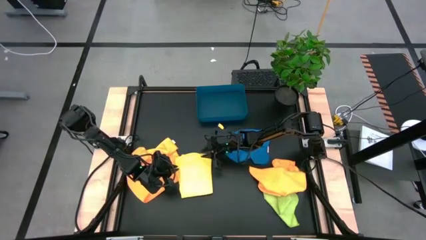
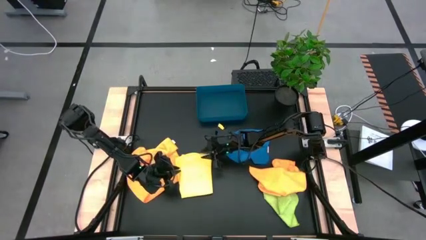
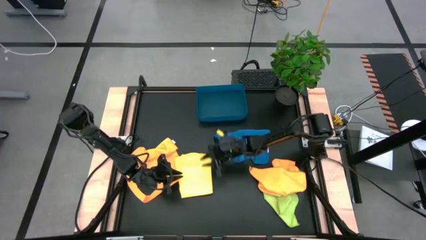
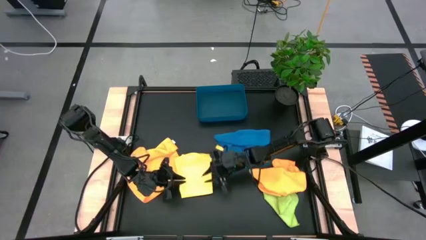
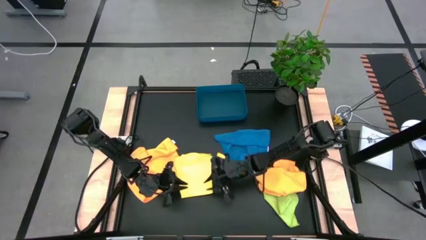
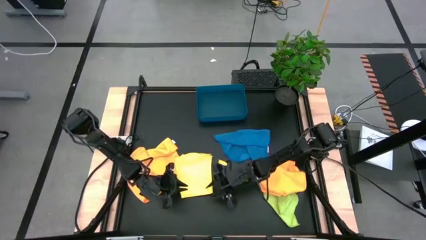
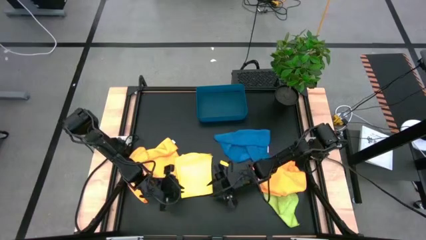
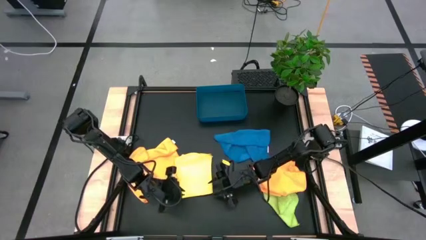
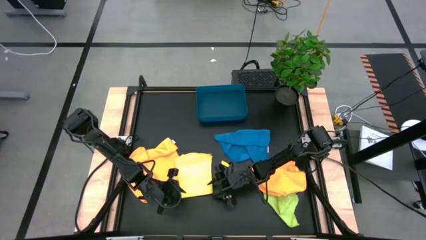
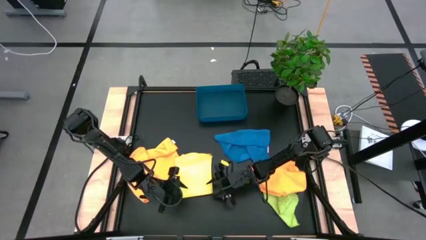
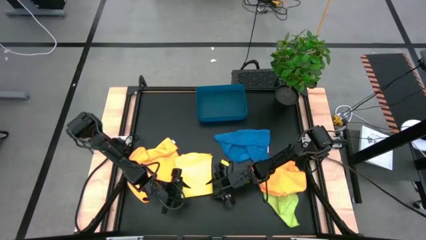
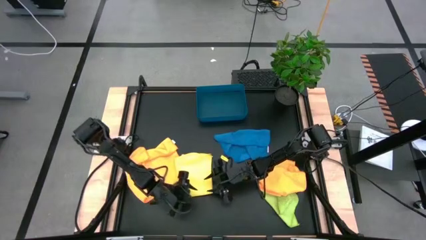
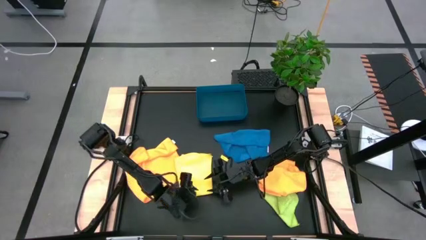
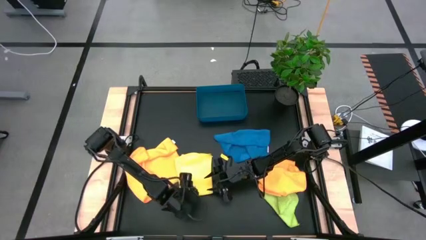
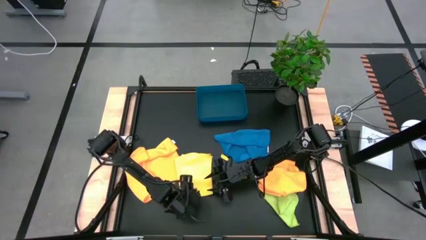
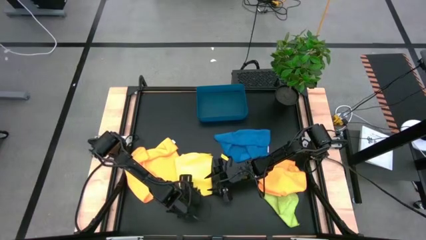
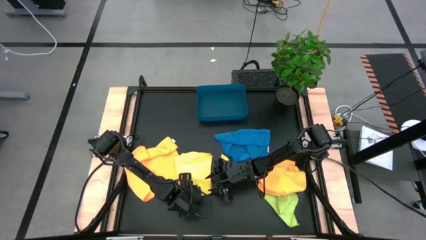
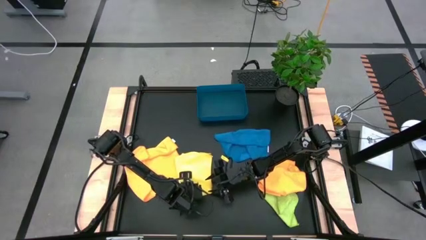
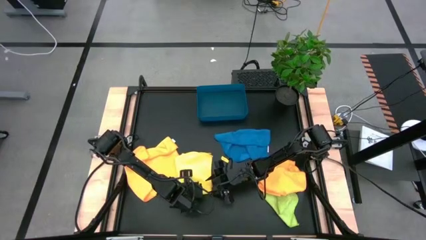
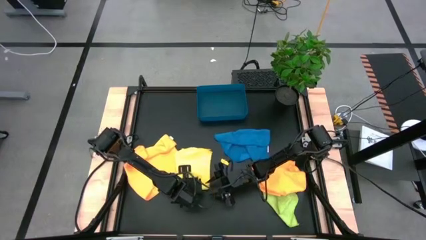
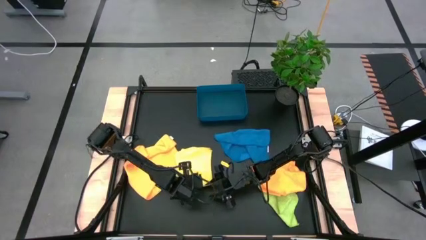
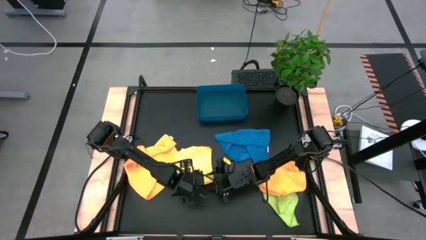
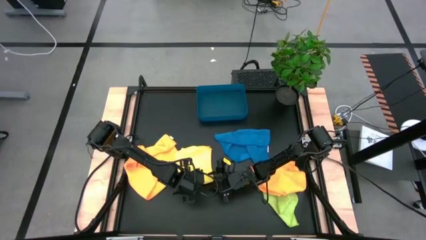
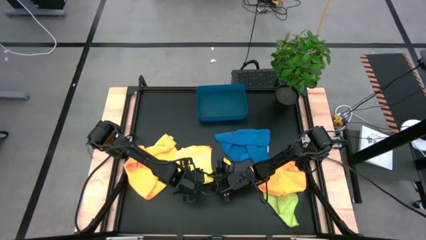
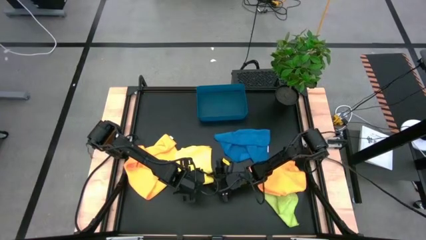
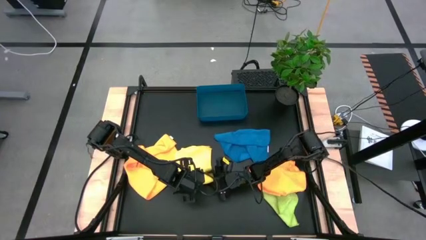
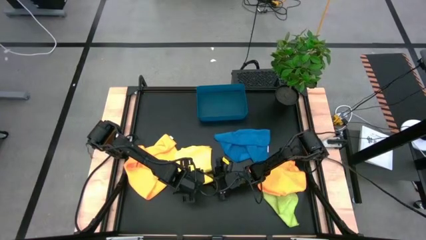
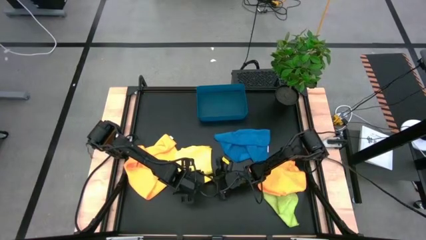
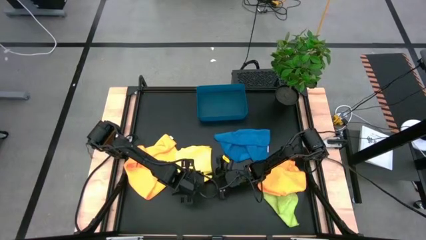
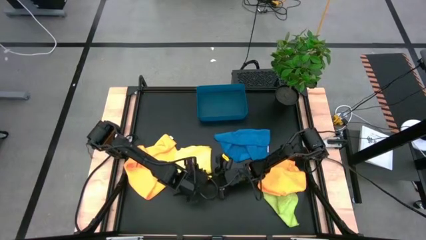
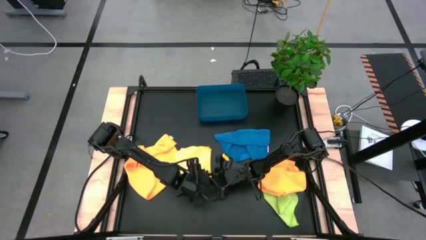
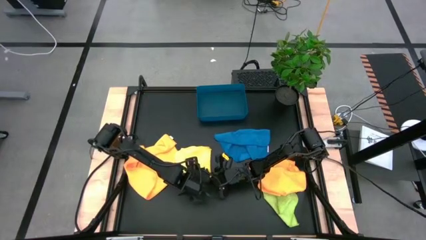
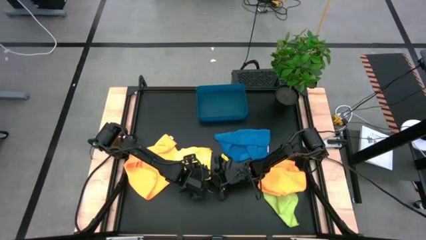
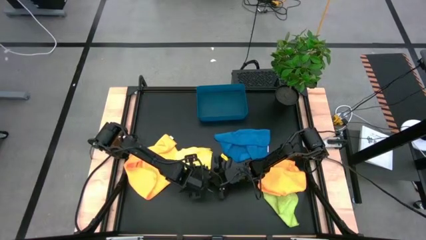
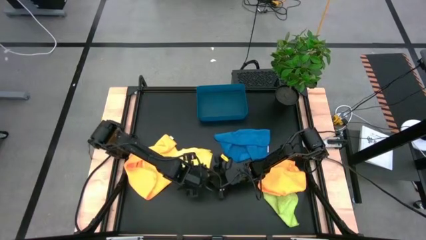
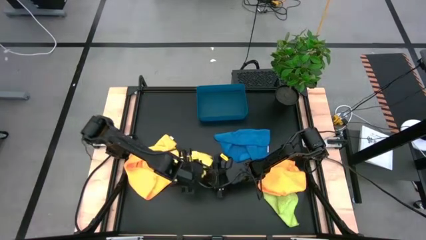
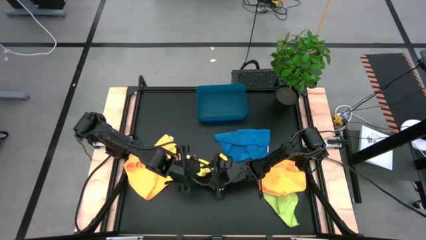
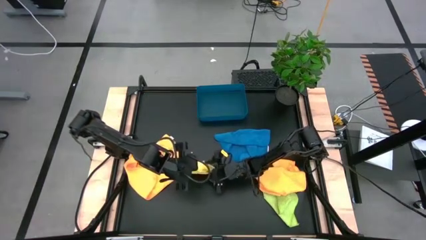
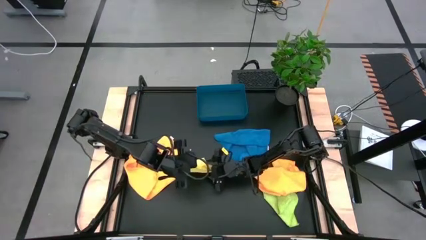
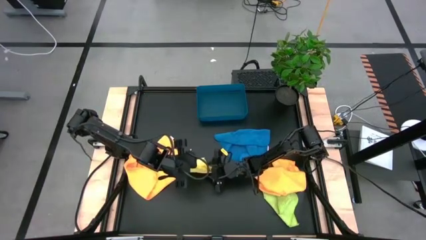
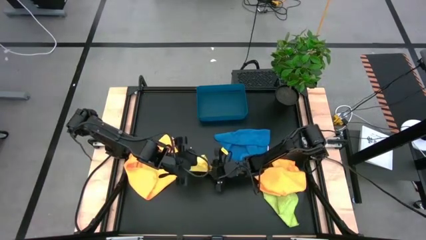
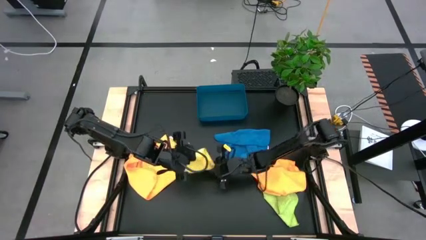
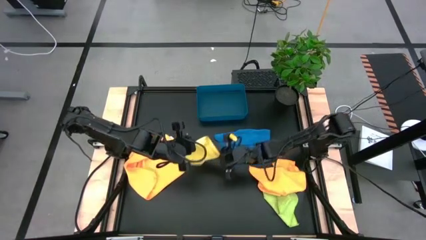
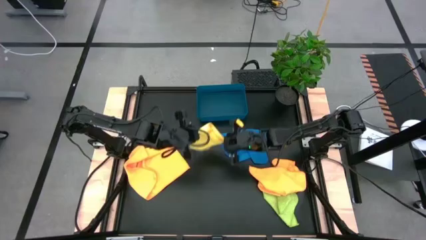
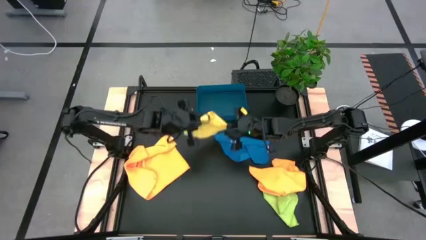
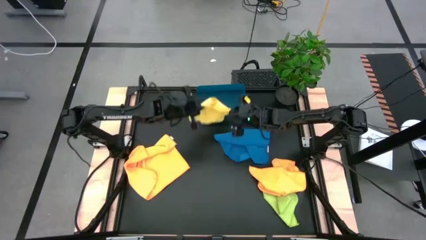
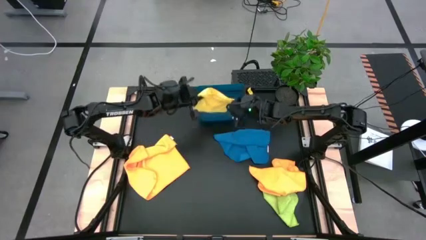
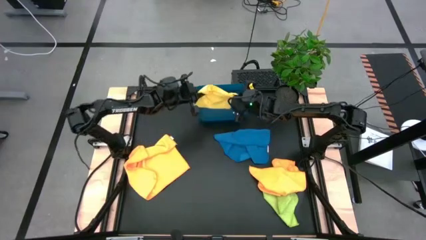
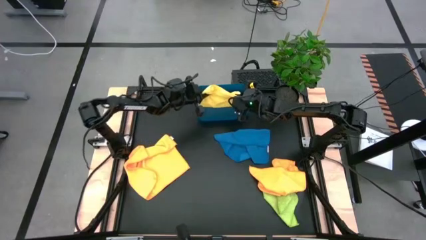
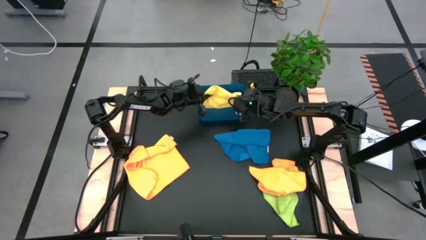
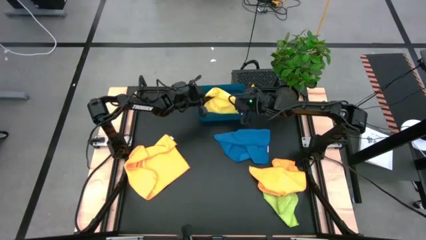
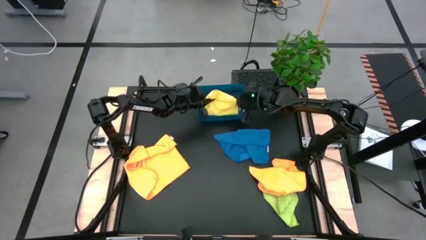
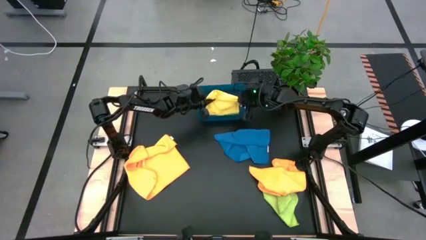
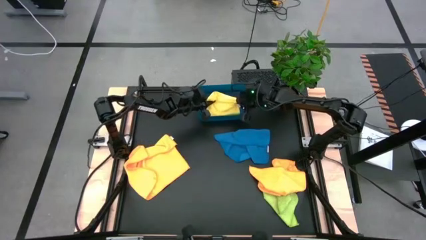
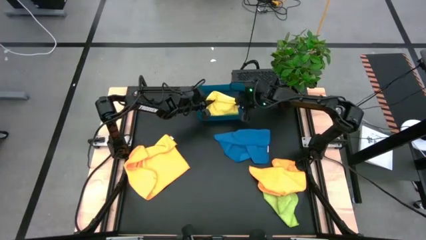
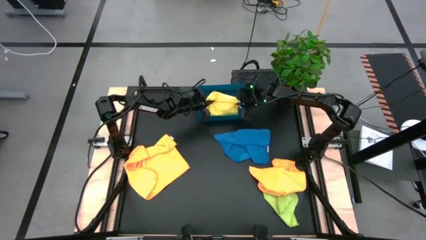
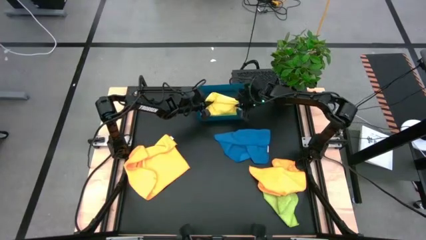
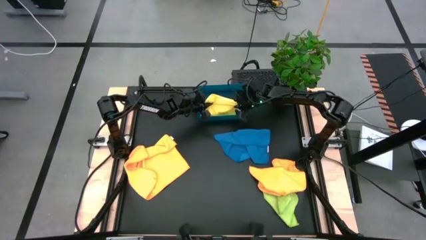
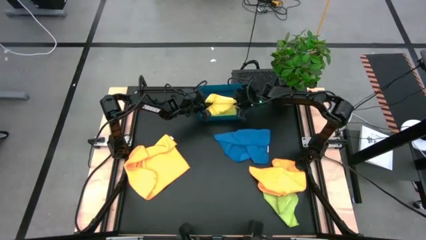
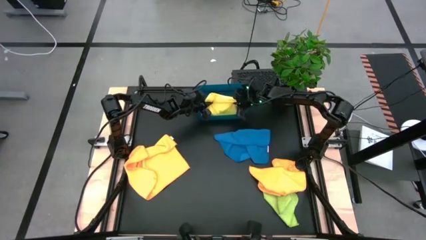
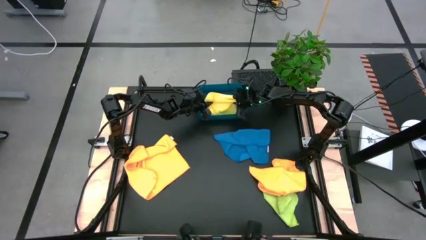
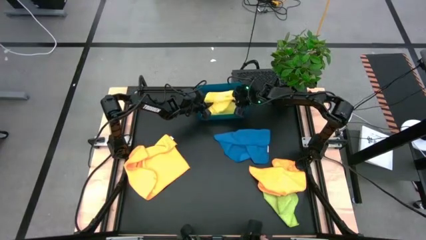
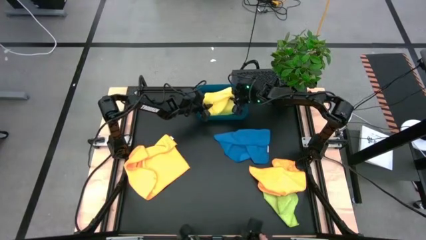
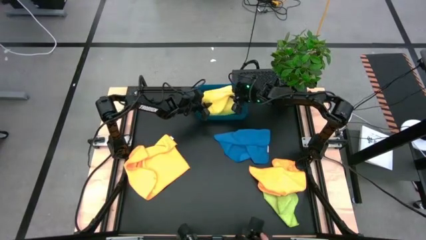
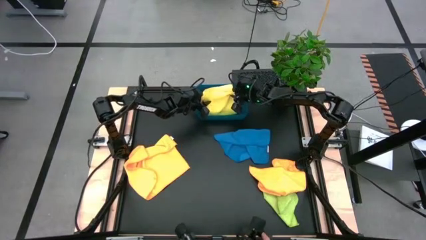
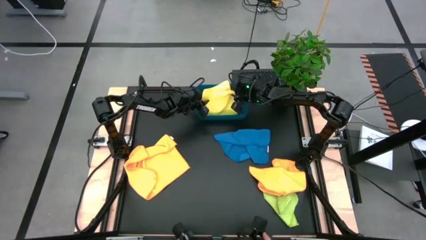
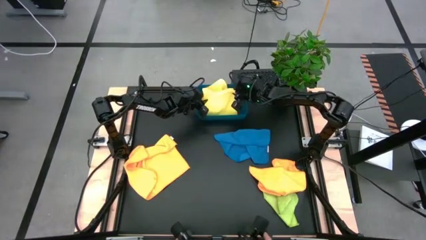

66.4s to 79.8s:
Task: Fold microfiber towels
Put the yellow microfiber towel into the bin
